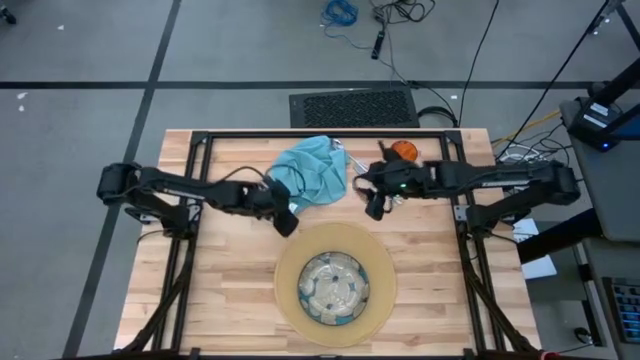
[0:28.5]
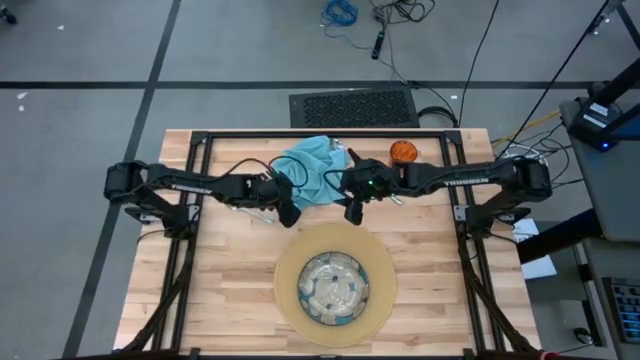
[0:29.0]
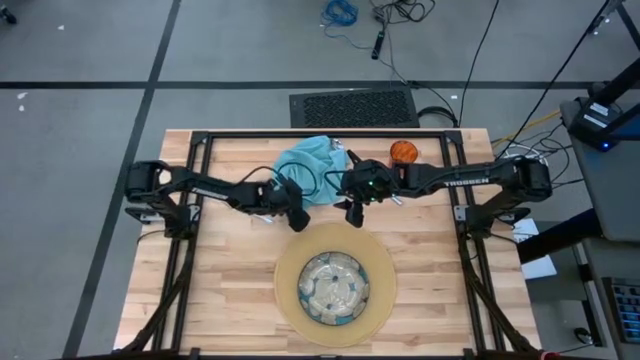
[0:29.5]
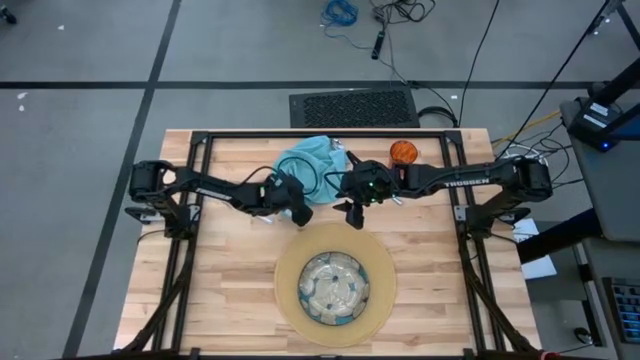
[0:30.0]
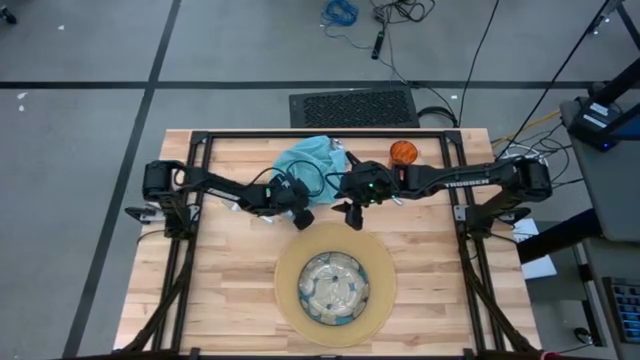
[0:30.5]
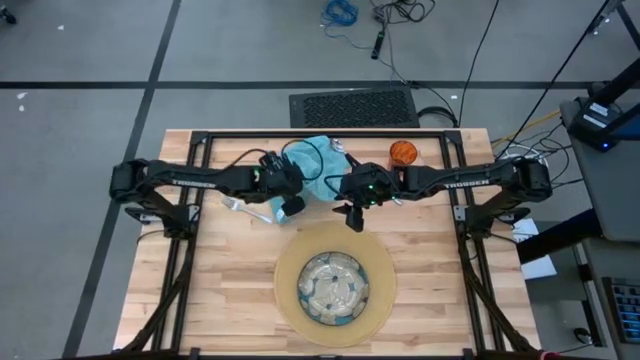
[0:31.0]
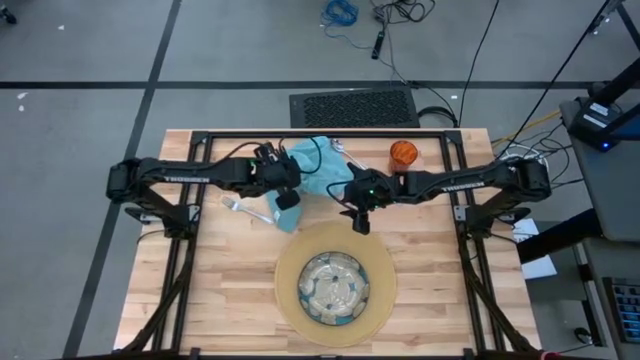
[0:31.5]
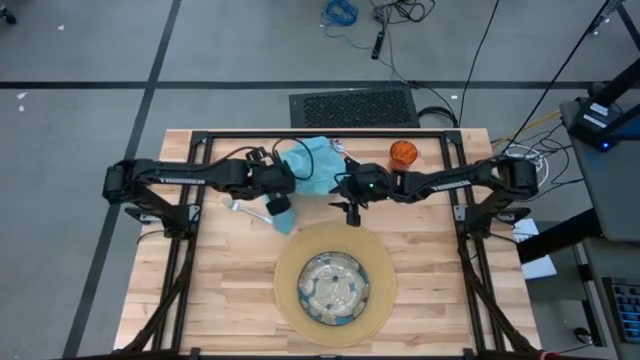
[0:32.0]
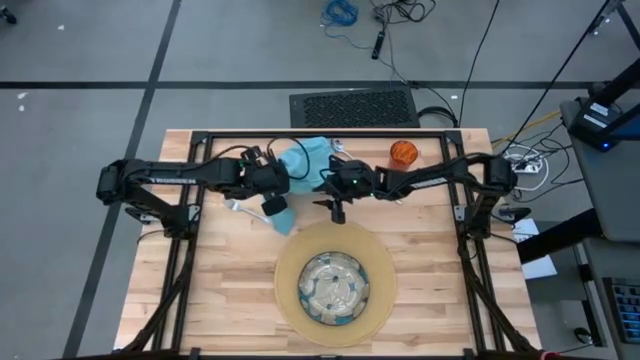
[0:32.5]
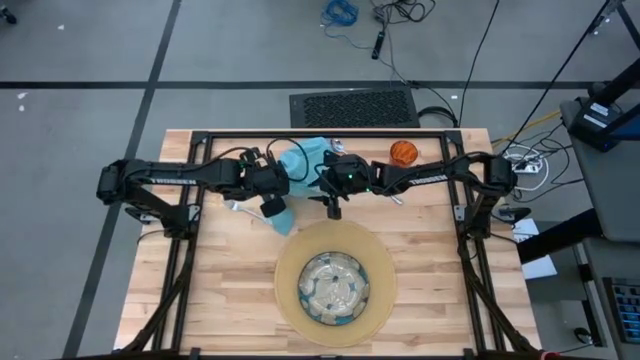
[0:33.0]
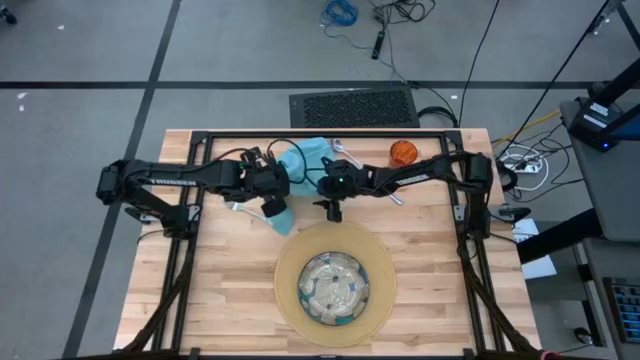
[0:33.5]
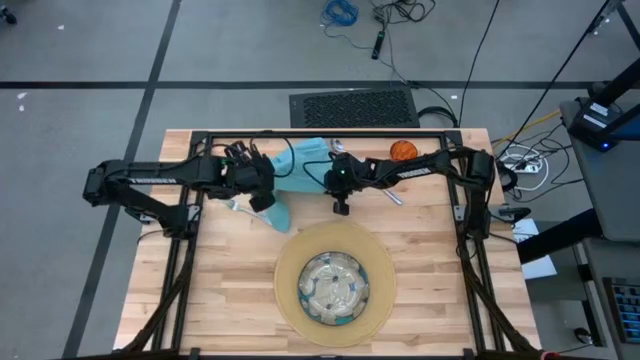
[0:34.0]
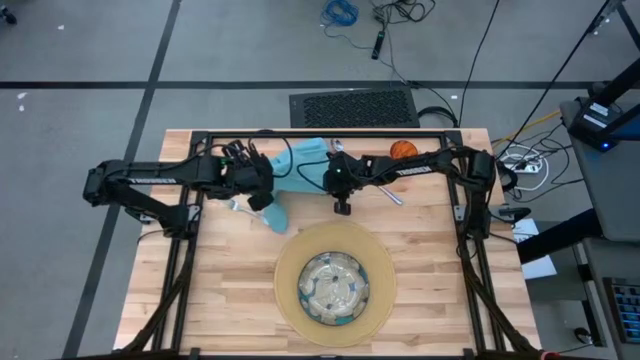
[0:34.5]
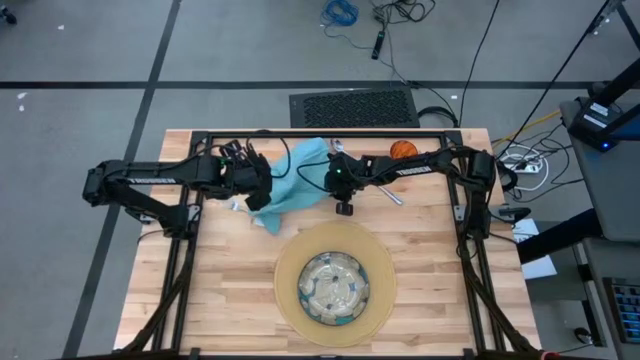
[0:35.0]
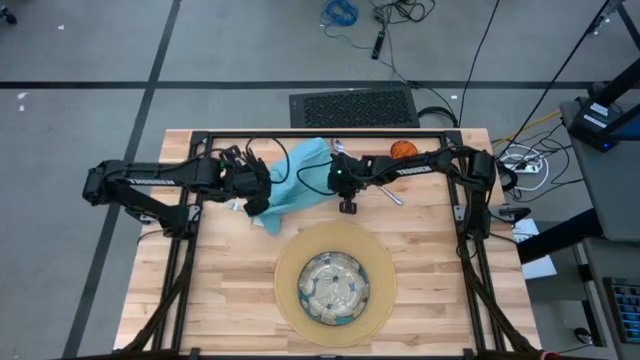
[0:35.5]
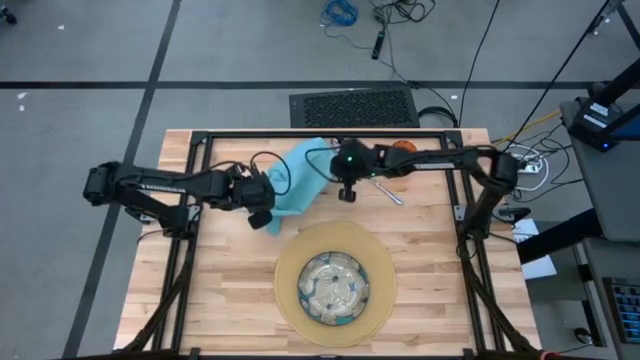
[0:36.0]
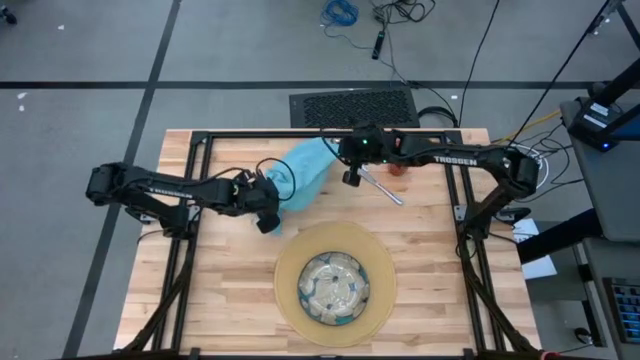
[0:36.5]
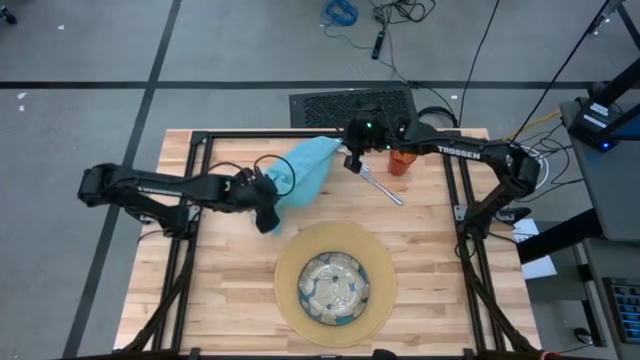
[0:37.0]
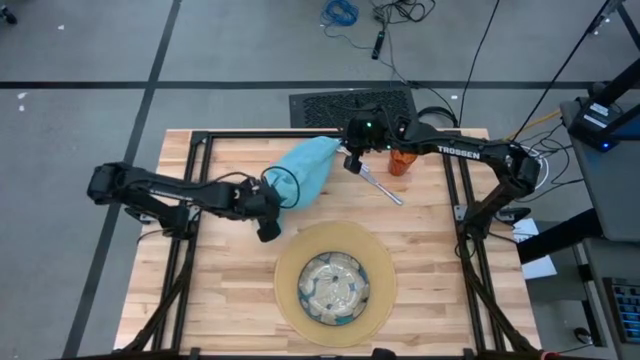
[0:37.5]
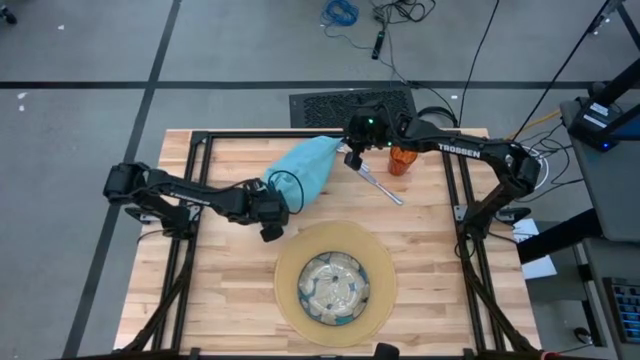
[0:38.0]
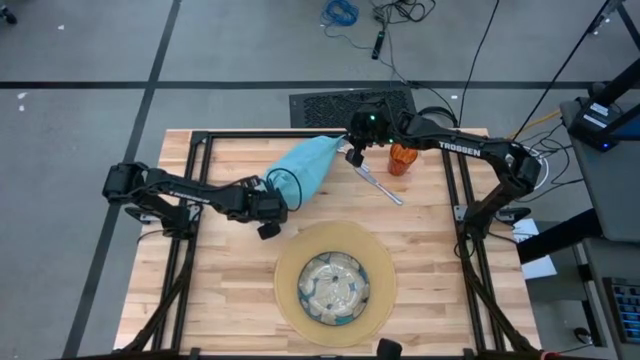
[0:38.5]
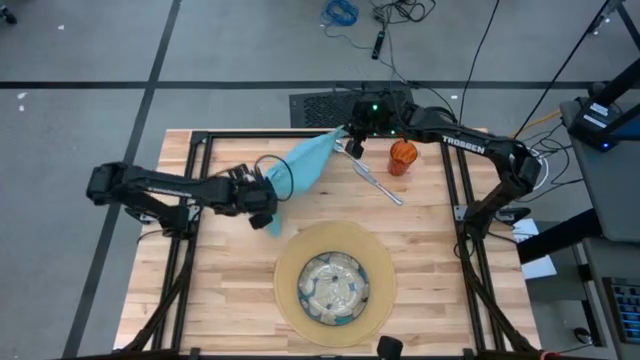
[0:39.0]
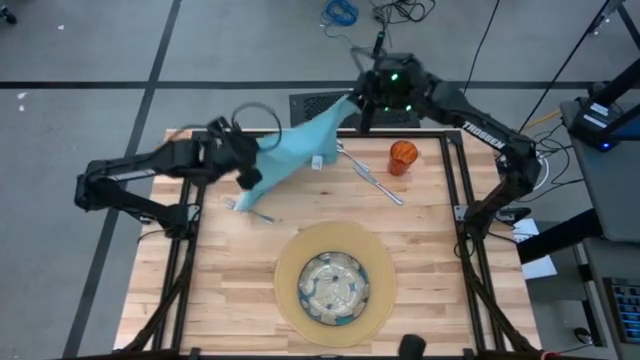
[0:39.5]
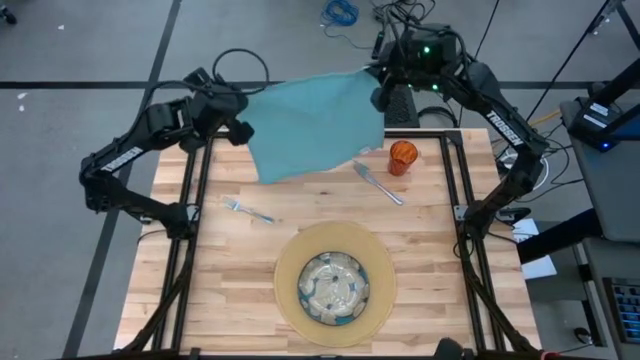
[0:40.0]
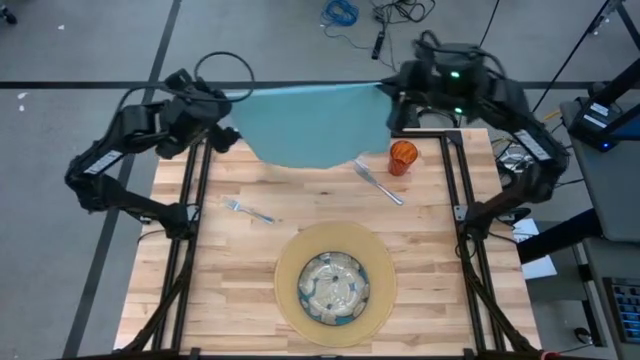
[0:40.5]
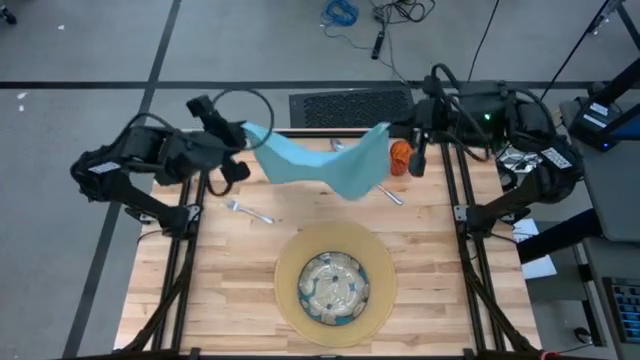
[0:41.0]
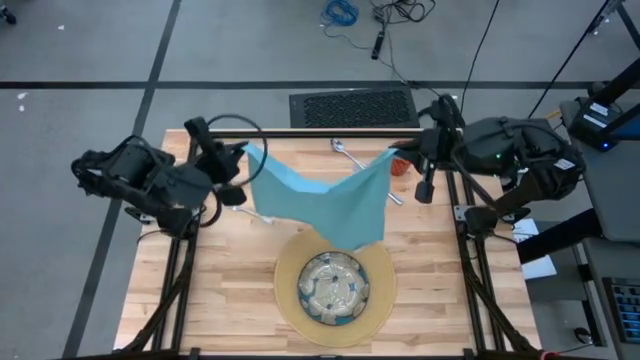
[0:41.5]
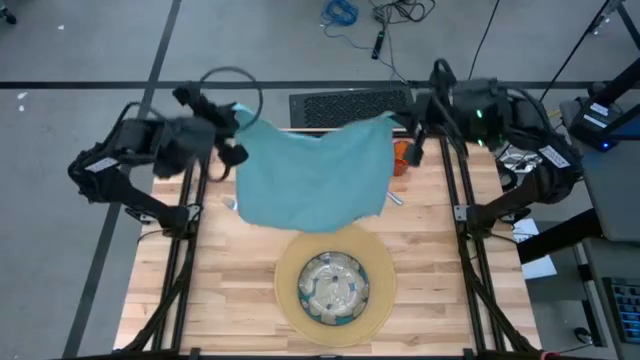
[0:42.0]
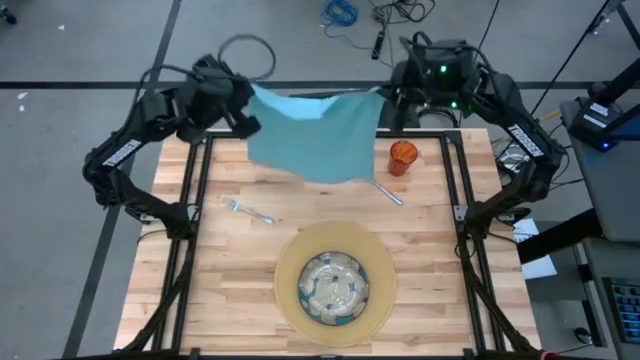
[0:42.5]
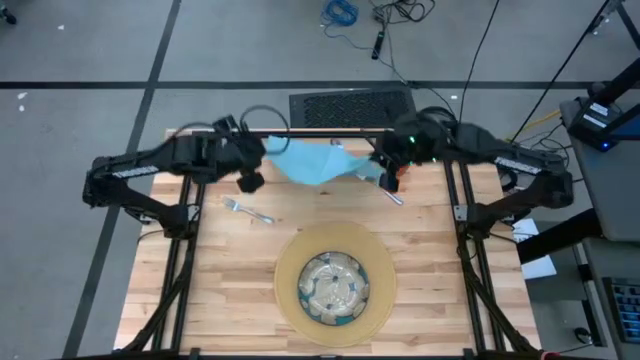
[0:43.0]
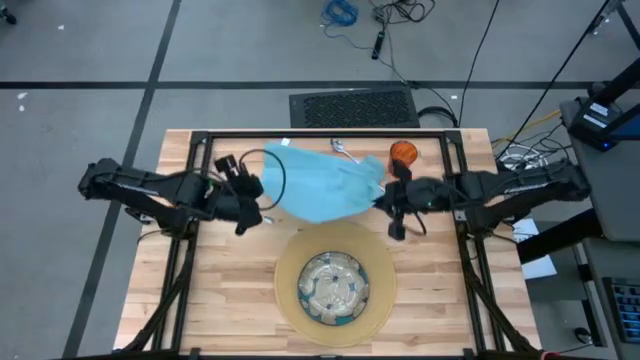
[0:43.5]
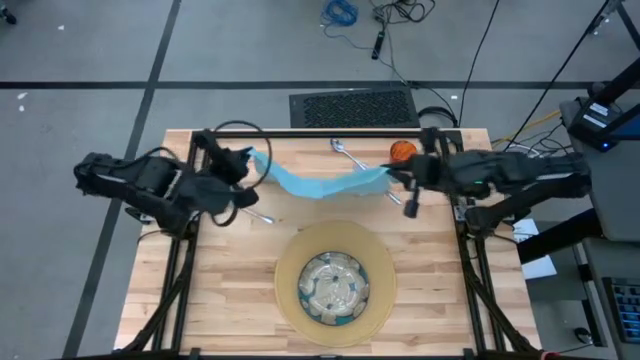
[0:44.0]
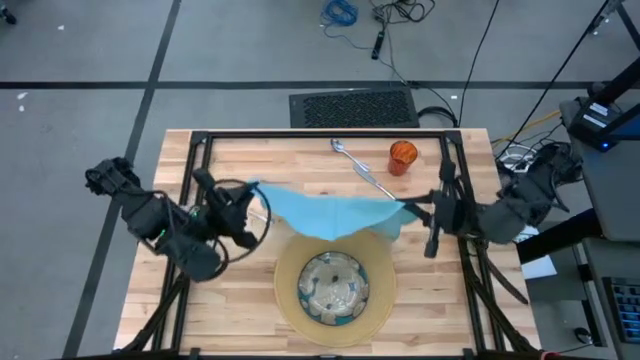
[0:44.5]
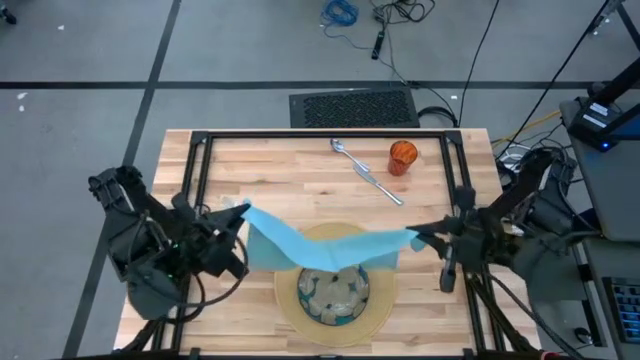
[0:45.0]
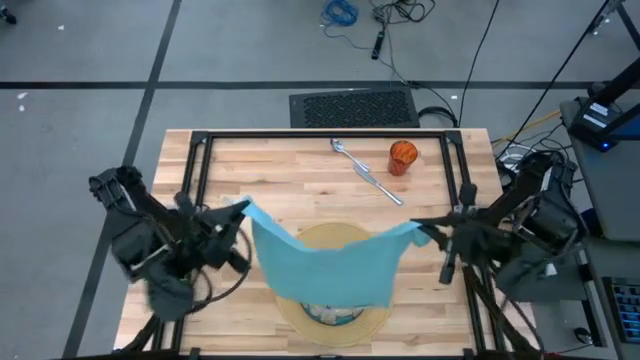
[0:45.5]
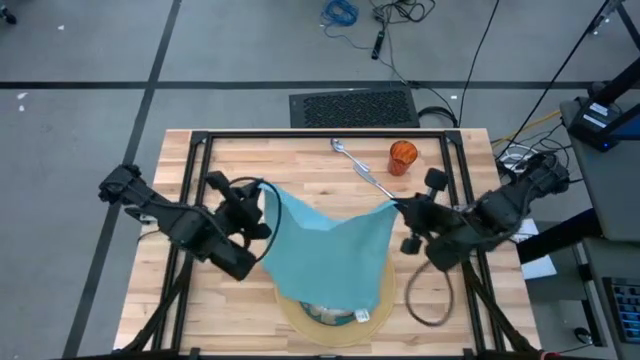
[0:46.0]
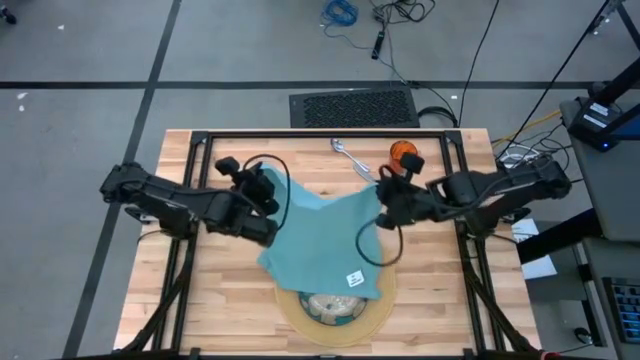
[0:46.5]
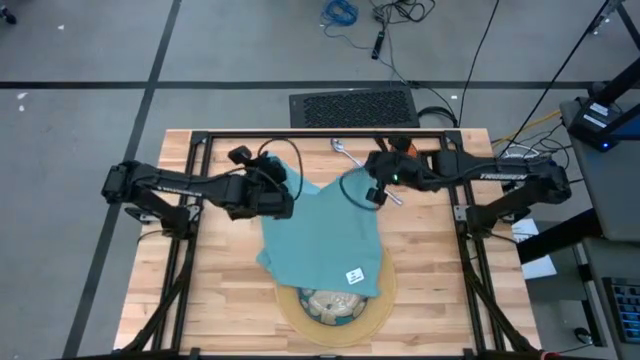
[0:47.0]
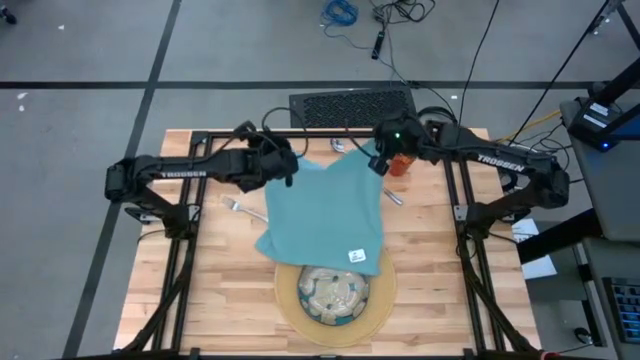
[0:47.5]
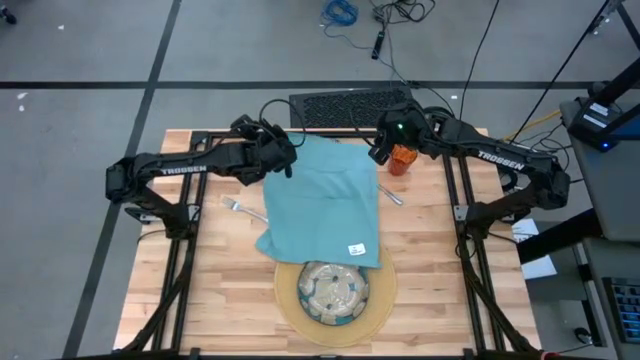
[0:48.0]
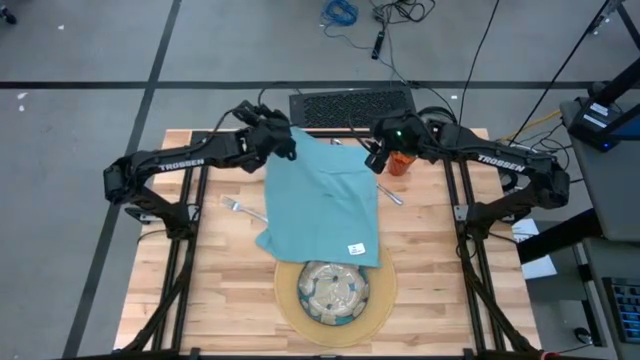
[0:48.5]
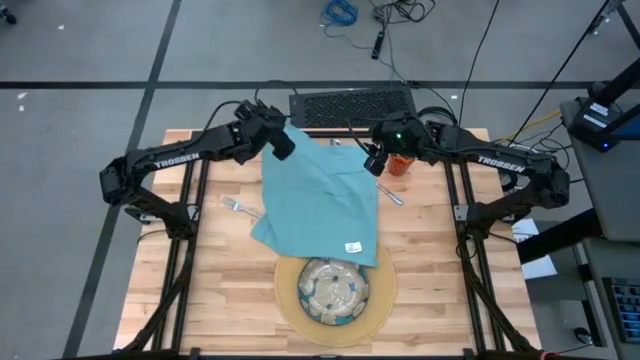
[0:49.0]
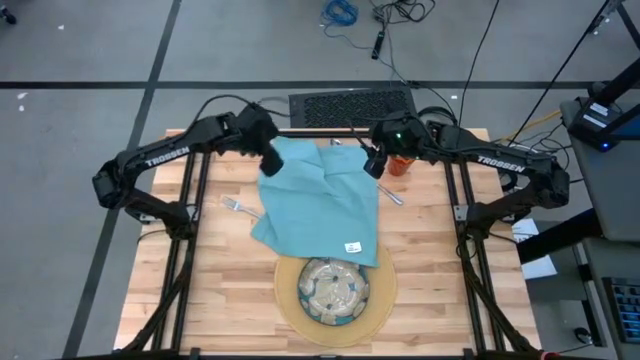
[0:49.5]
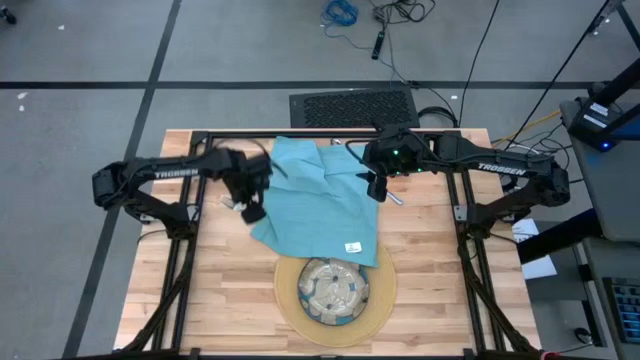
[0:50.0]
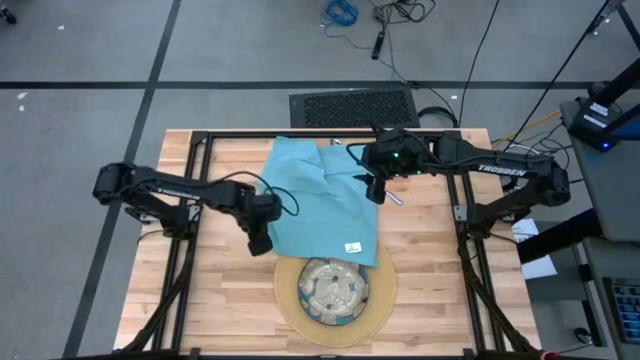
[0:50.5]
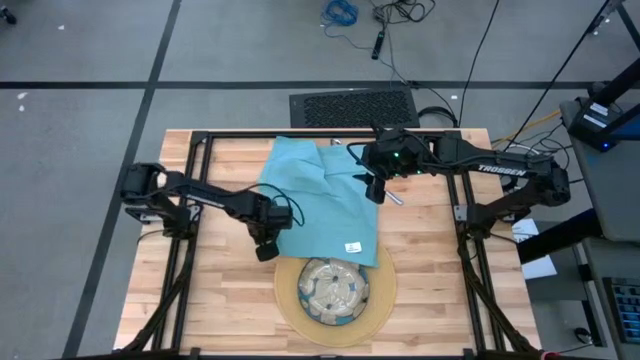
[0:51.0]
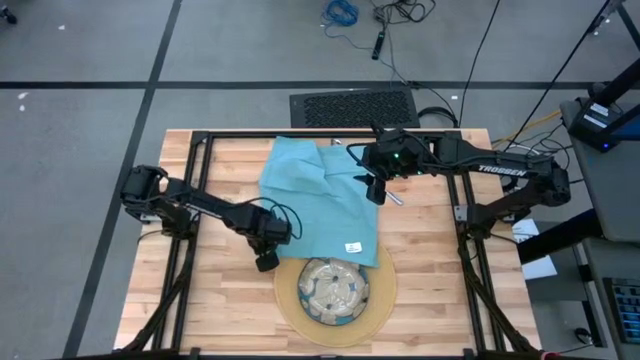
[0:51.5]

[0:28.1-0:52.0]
Task: Set table place
Fold the blue napkin
